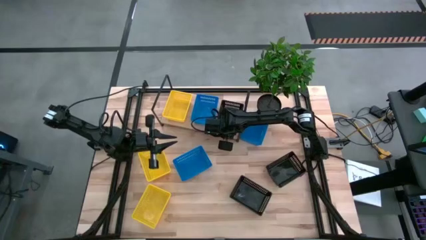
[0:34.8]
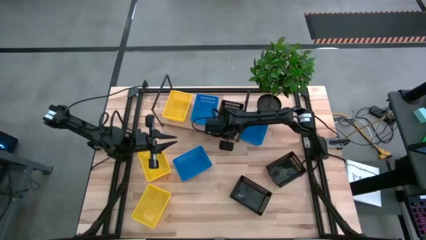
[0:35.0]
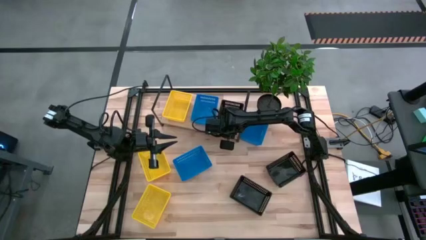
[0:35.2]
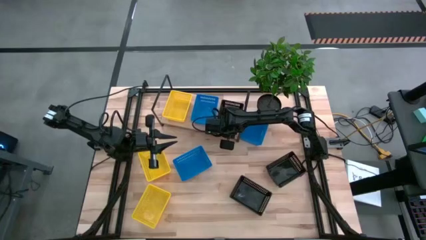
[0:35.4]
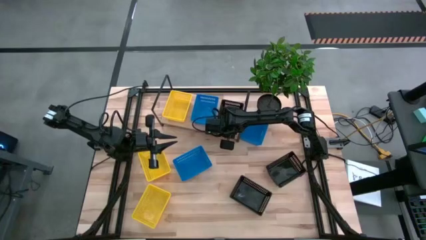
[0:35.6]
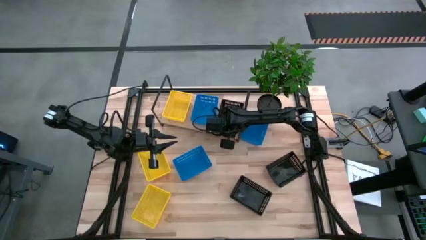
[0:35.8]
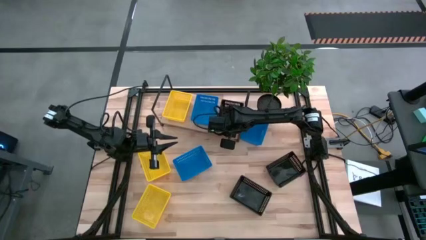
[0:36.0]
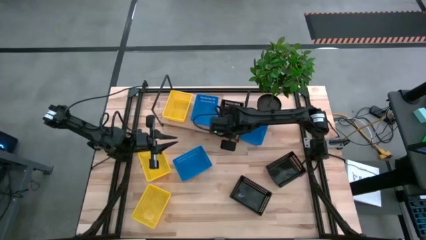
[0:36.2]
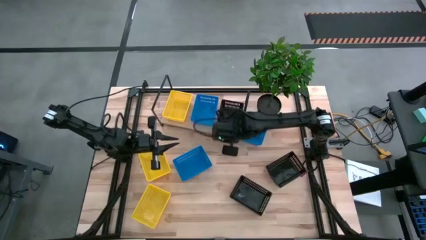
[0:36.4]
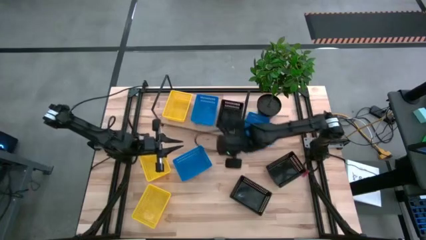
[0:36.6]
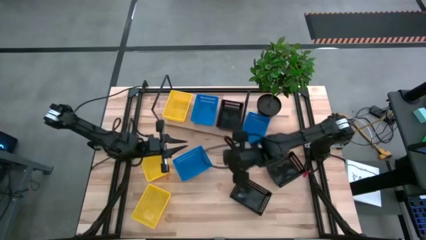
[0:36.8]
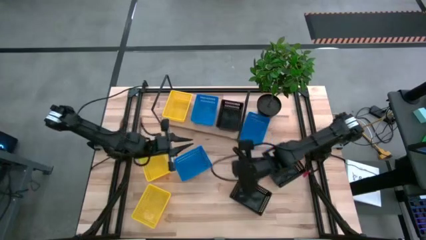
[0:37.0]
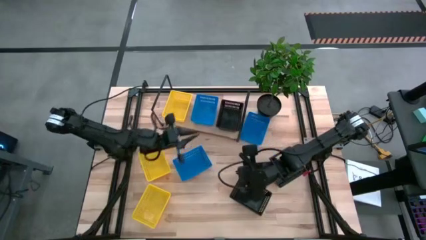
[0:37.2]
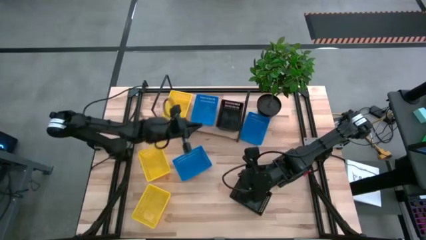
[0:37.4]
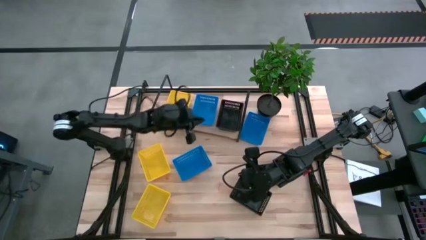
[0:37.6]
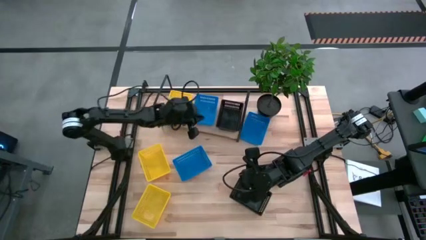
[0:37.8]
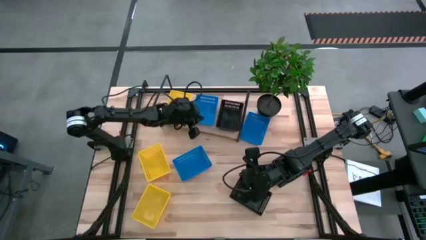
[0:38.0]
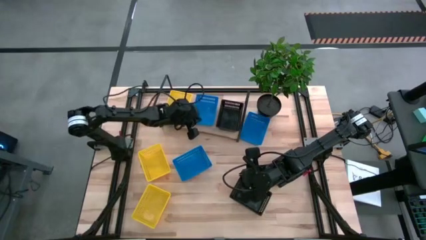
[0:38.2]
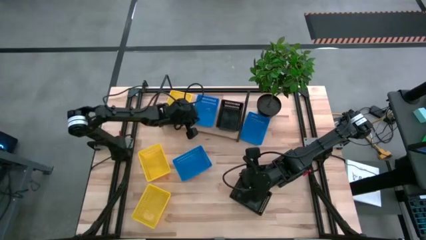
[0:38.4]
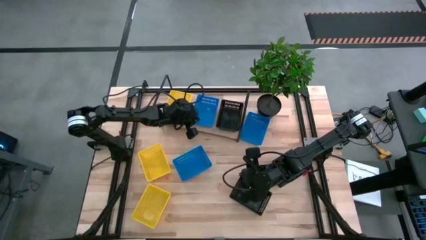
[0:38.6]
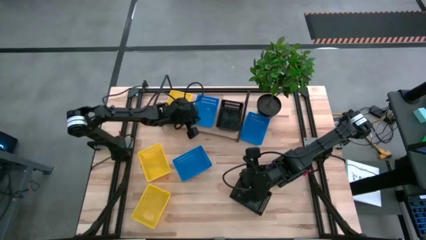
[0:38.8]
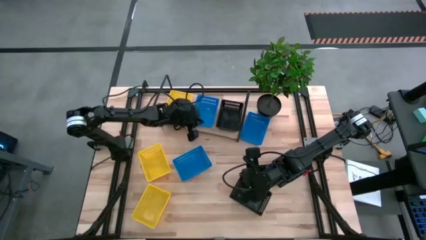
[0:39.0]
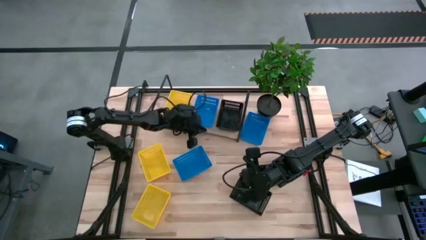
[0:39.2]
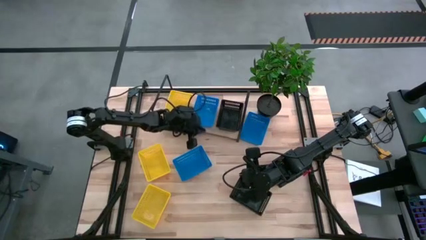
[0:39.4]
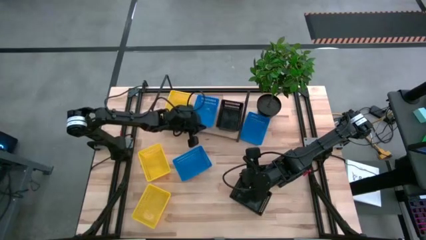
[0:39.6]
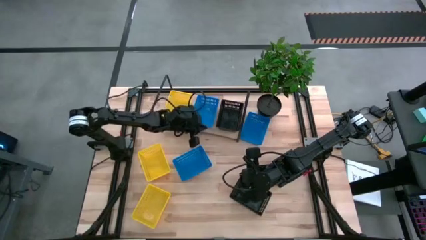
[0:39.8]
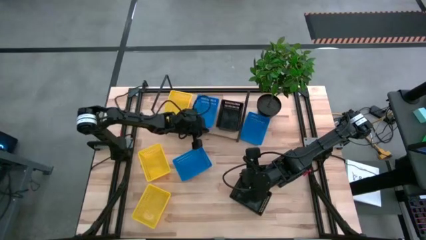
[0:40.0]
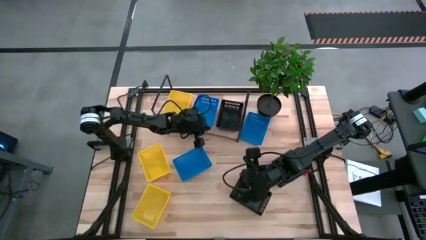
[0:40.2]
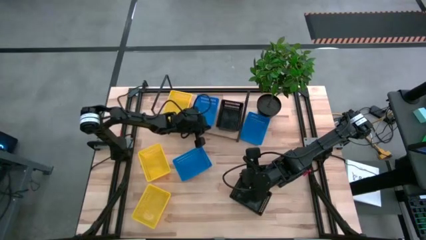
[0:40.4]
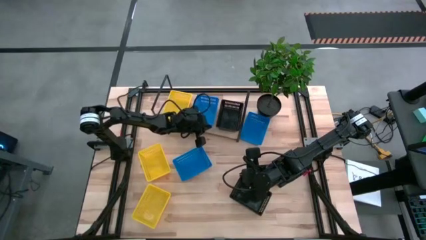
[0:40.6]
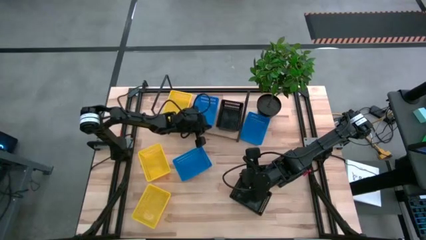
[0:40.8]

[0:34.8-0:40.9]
Task: Stack baskets on shelf by color
Adjust the blue basket on the shelf

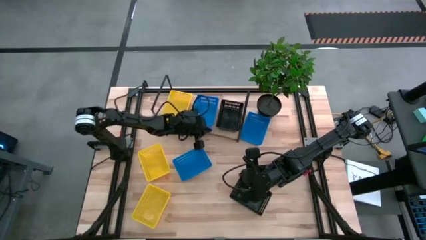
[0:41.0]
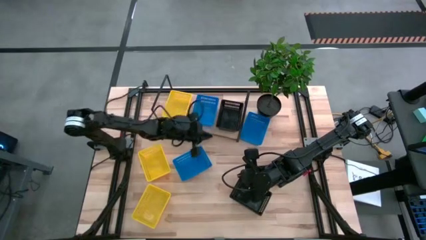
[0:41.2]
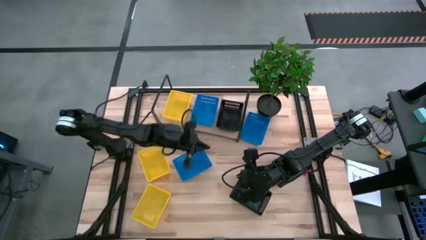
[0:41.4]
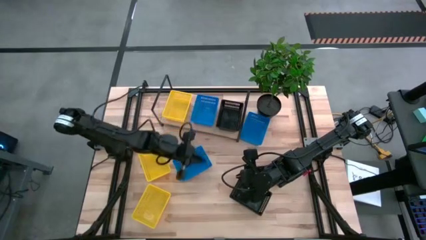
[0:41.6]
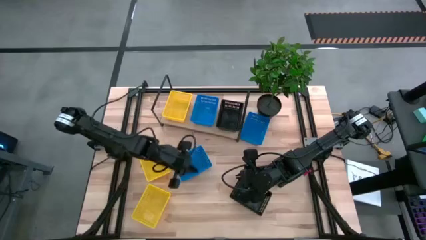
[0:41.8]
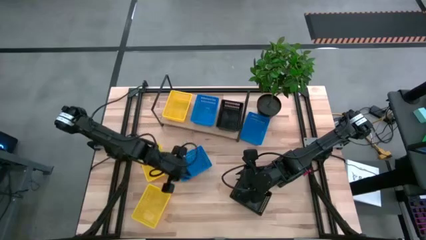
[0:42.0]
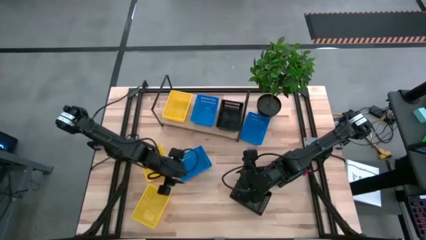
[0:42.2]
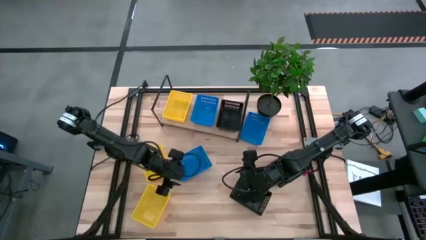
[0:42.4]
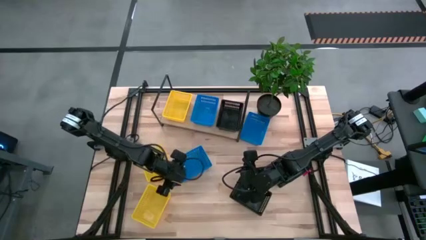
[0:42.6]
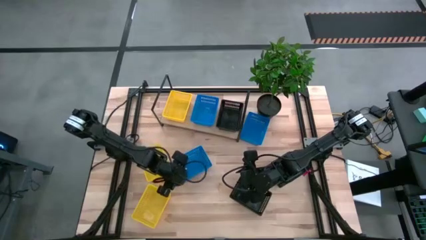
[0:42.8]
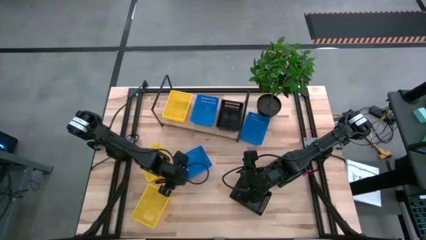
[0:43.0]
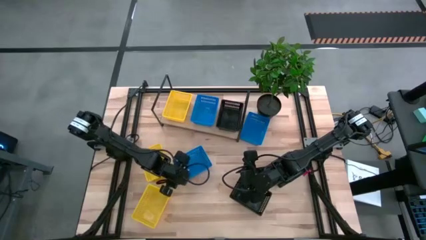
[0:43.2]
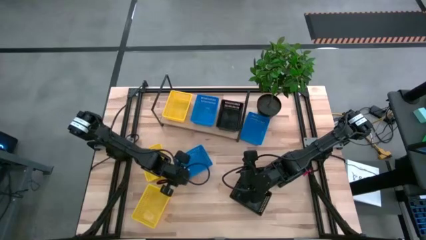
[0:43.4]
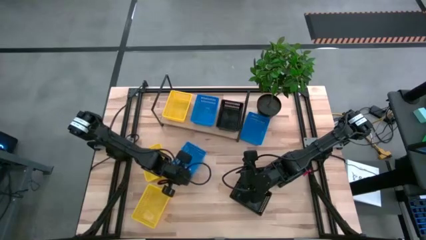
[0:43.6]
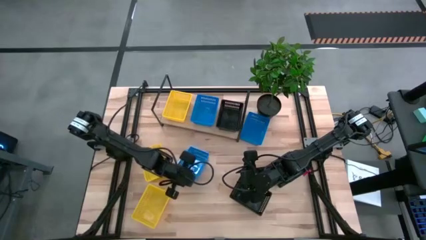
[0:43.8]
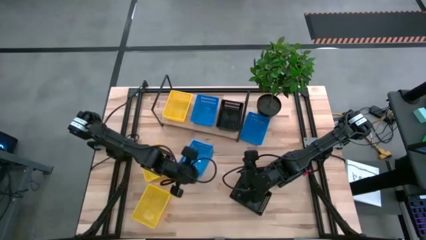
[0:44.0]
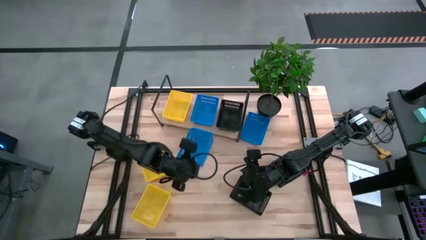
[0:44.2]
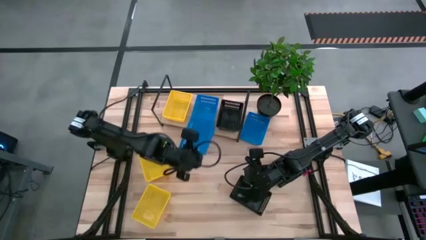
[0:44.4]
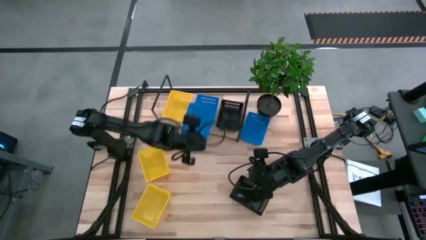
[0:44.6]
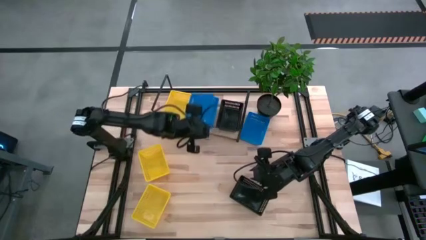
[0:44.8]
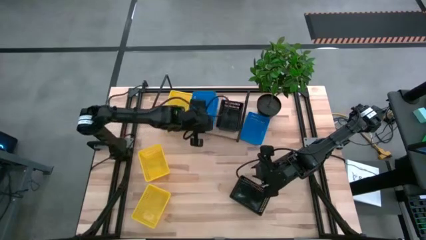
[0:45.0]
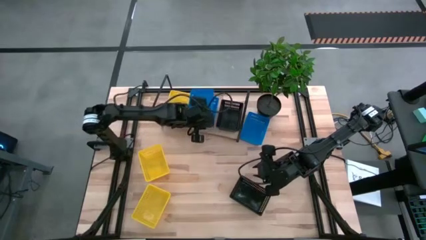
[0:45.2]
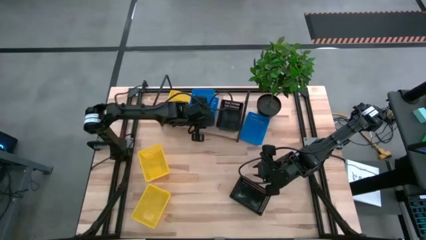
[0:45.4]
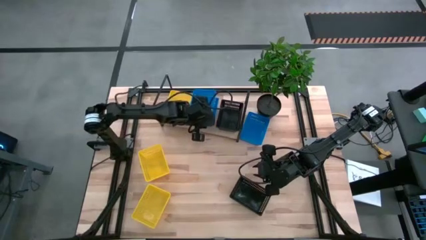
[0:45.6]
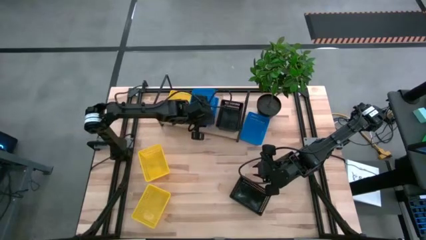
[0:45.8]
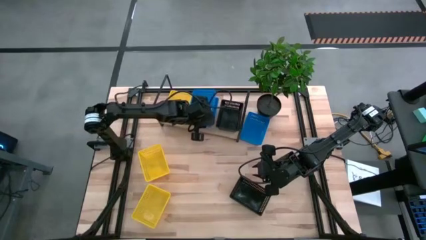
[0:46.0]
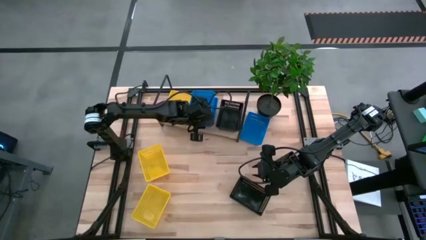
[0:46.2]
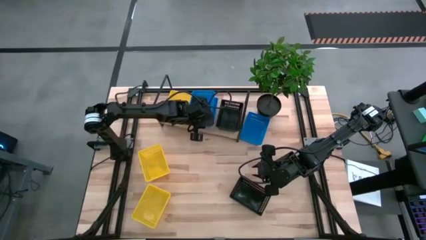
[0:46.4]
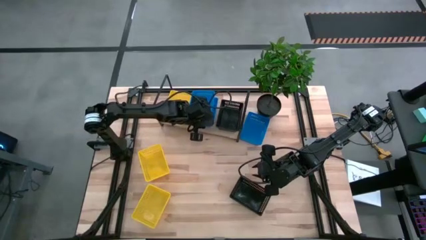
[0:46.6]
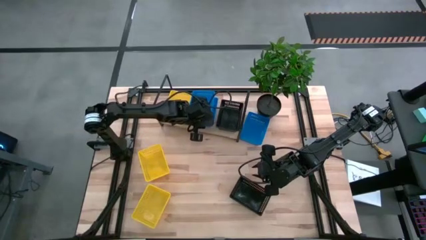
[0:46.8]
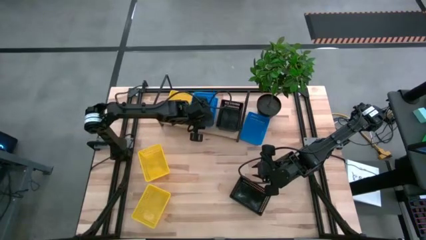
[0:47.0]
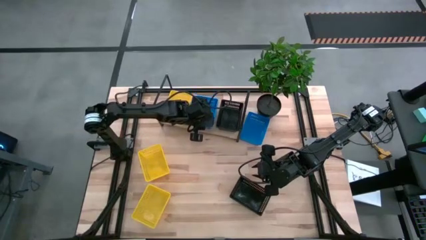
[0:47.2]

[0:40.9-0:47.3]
Stack the bottom blue basket on top of the other blue basket on the shelf

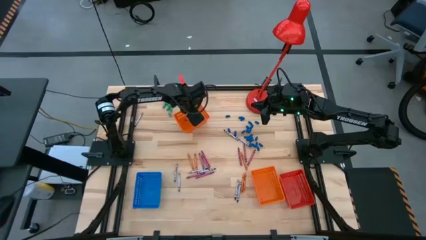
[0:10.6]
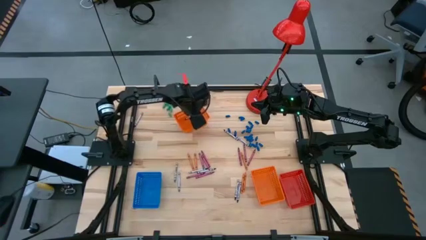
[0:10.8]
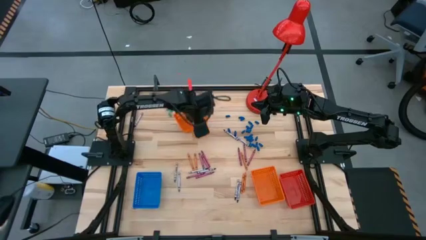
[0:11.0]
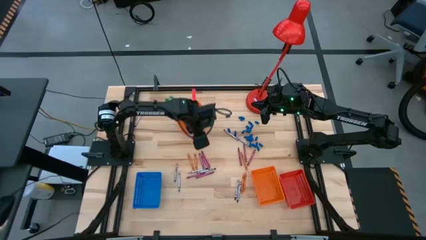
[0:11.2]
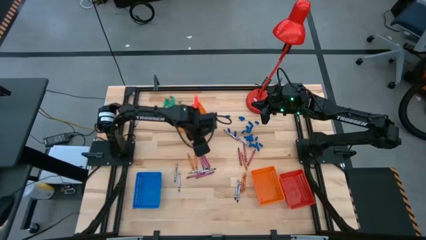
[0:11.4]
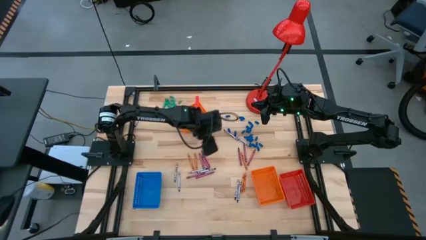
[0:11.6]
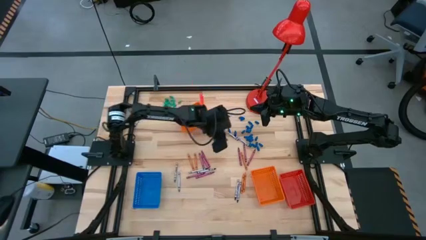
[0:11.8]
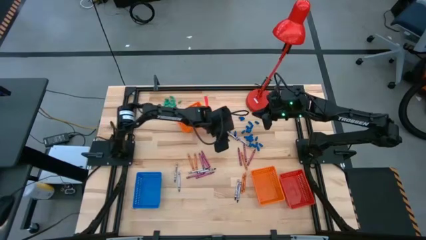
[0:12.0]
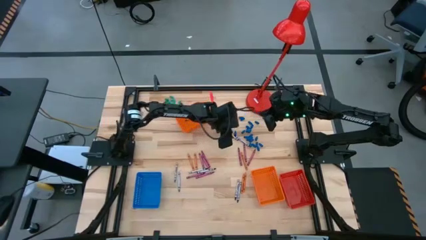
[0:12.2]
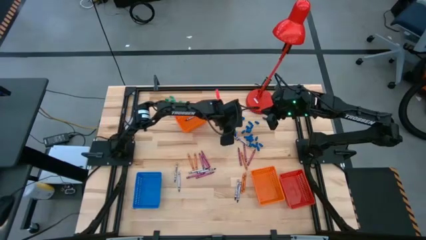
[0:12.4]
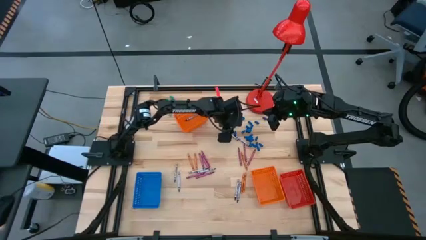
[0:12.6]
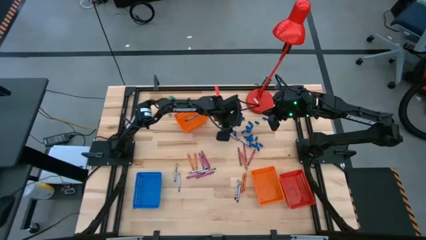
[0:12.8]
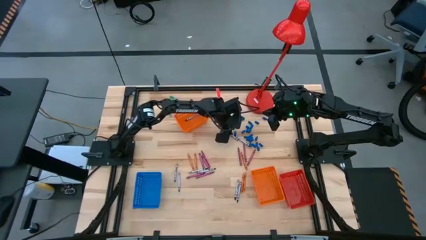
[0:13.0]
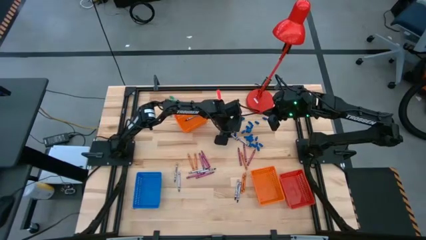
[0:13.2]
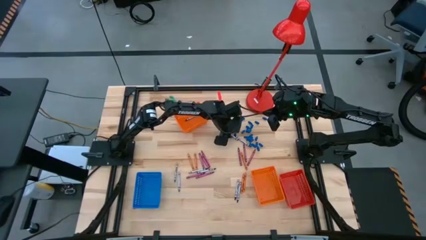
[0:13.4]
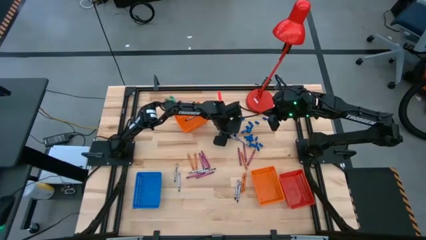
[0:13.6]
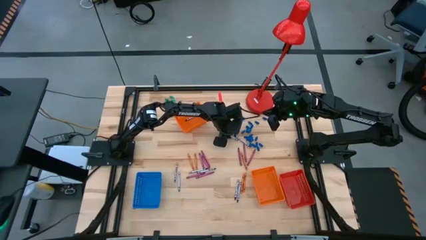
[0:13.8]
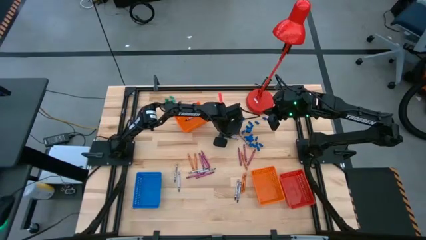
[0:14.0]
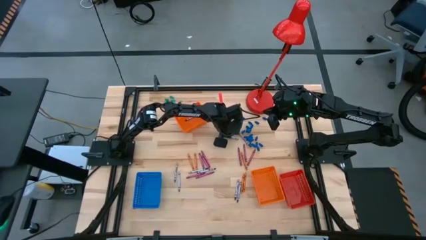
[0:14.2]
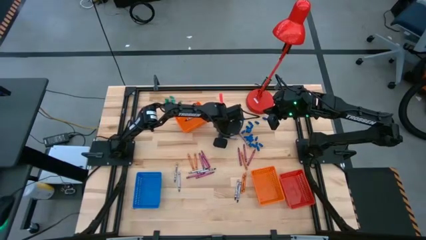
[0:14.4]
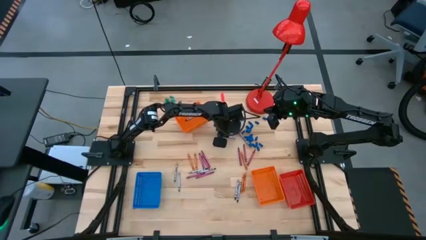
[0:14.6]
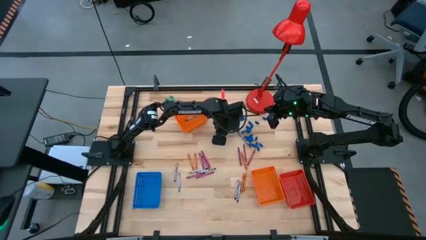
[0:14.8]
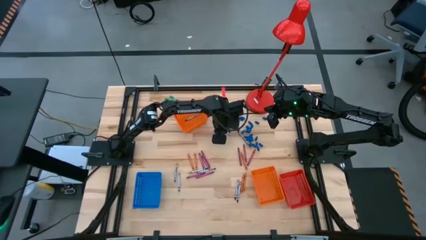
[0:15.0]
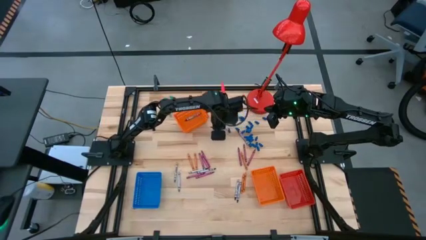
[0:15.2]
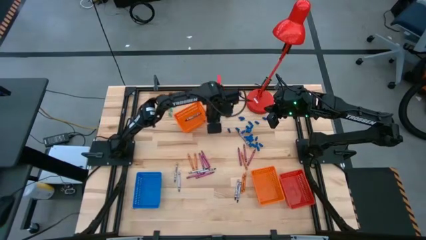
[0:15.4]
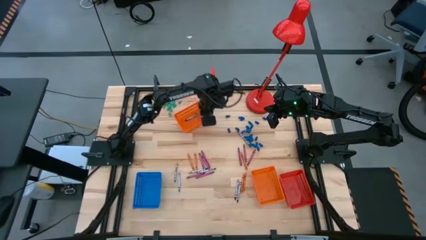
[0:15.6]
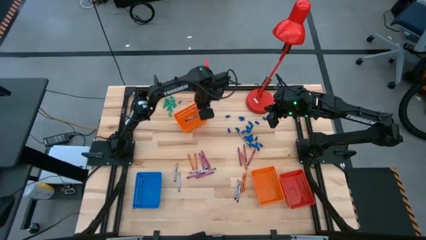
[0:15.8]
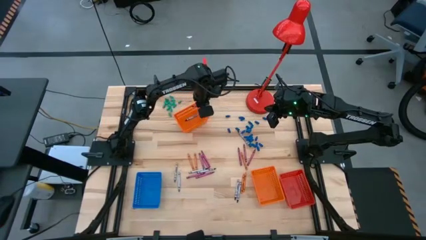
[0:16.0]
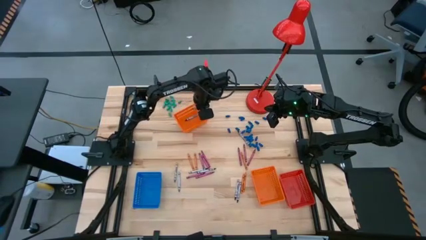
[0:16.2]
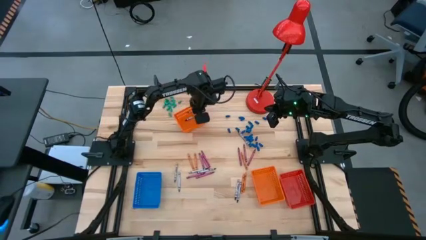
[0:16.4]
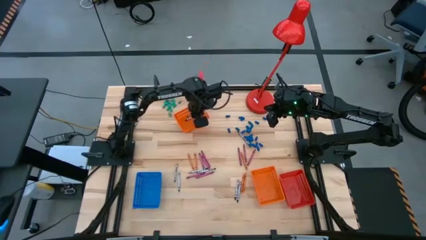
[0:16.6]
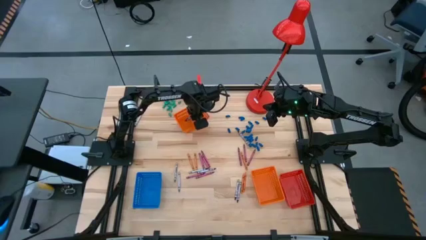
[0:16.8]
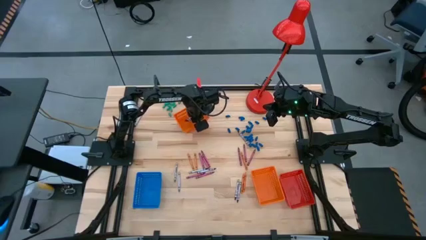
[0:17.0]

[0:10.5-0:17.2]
Task: Sort crayons
Put the black crayon into the top orange bin
